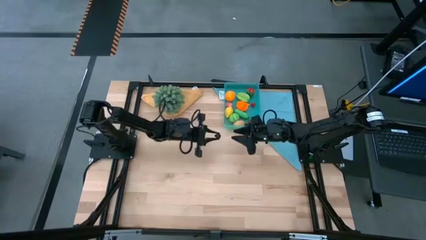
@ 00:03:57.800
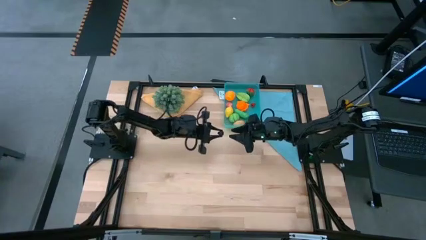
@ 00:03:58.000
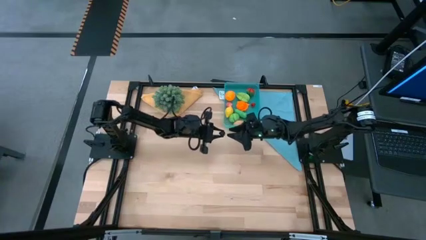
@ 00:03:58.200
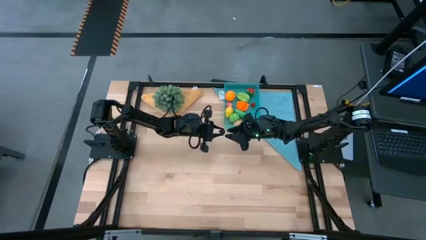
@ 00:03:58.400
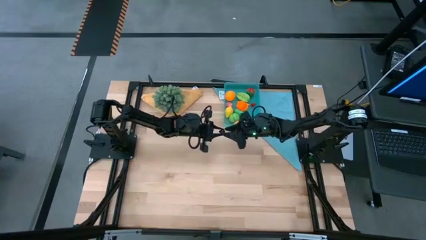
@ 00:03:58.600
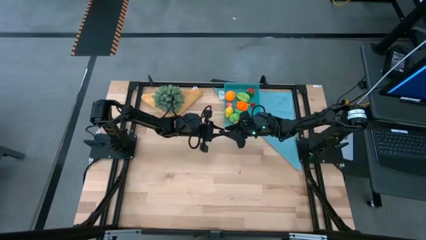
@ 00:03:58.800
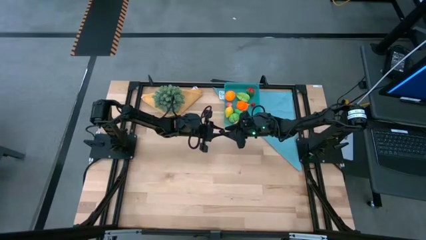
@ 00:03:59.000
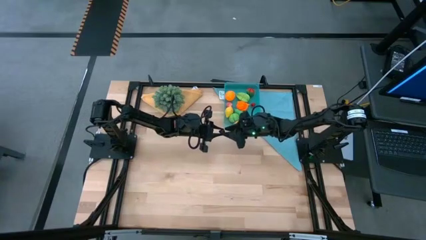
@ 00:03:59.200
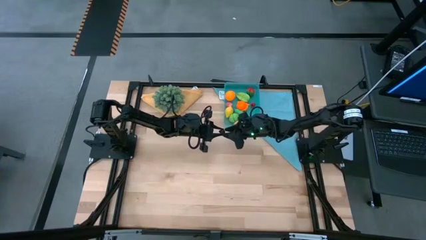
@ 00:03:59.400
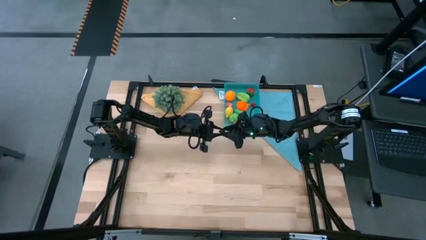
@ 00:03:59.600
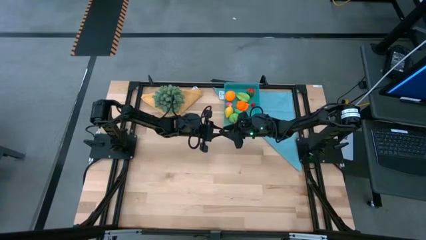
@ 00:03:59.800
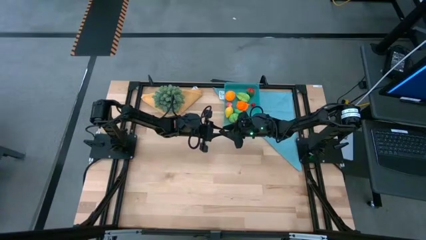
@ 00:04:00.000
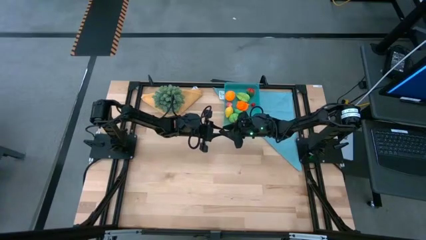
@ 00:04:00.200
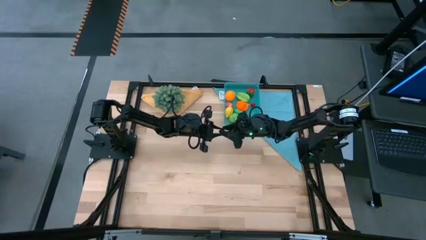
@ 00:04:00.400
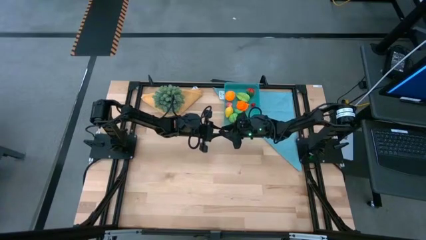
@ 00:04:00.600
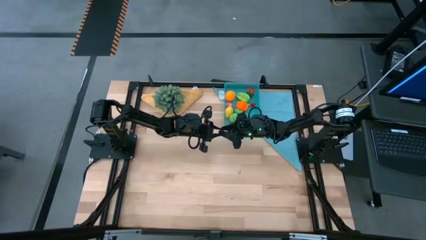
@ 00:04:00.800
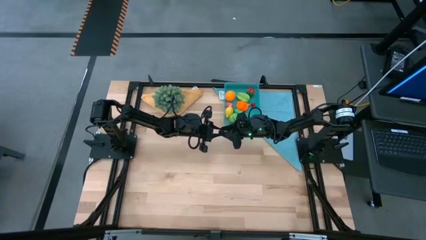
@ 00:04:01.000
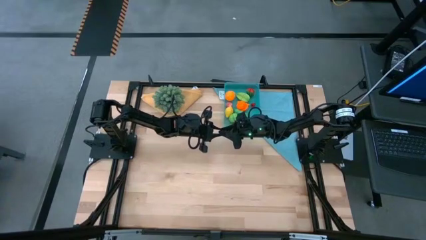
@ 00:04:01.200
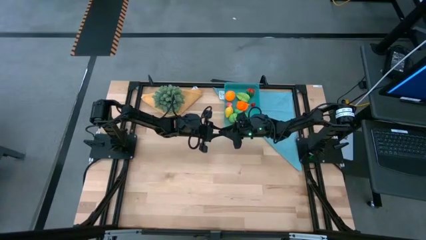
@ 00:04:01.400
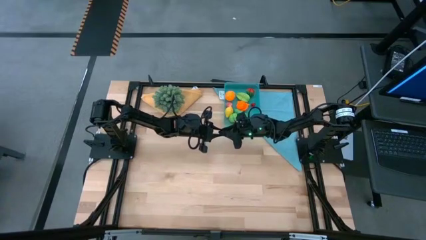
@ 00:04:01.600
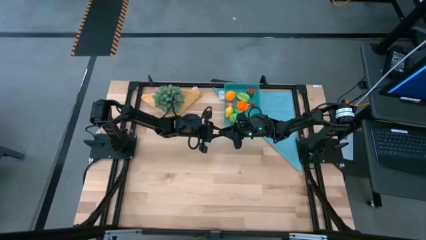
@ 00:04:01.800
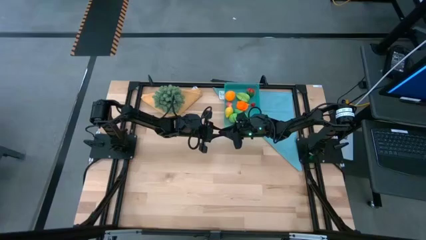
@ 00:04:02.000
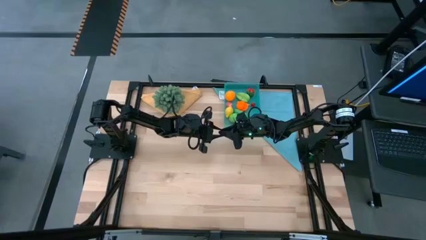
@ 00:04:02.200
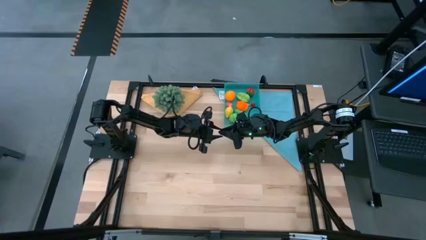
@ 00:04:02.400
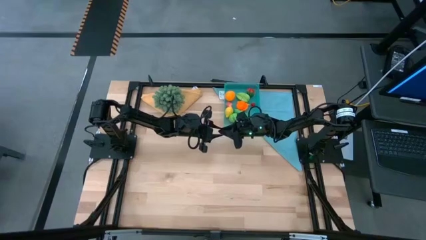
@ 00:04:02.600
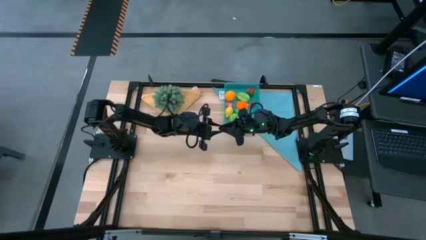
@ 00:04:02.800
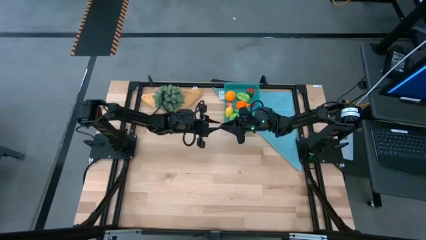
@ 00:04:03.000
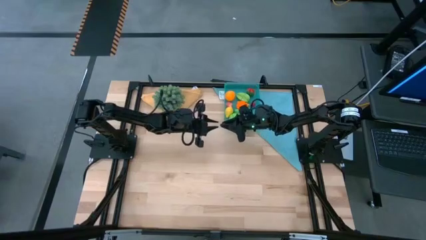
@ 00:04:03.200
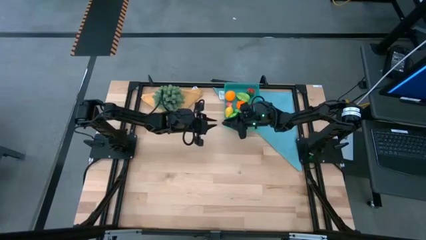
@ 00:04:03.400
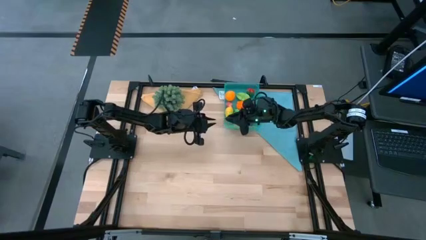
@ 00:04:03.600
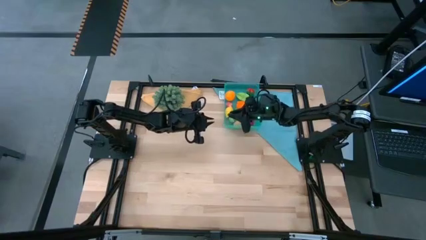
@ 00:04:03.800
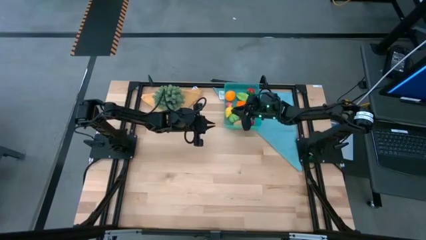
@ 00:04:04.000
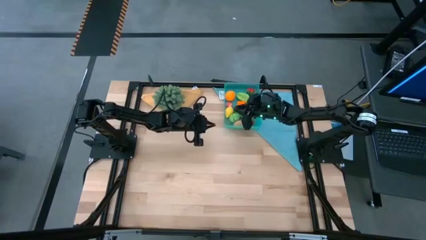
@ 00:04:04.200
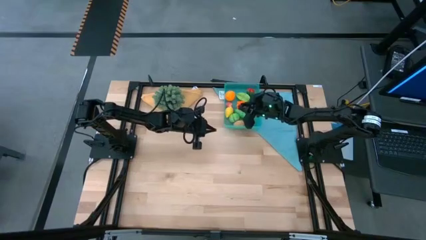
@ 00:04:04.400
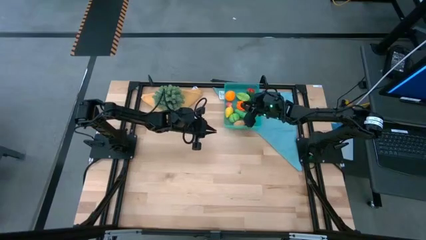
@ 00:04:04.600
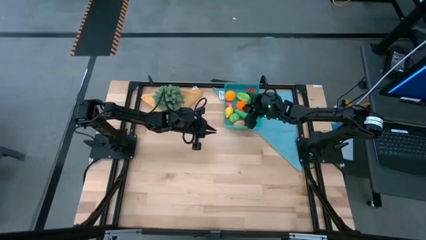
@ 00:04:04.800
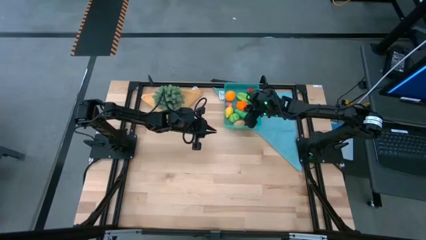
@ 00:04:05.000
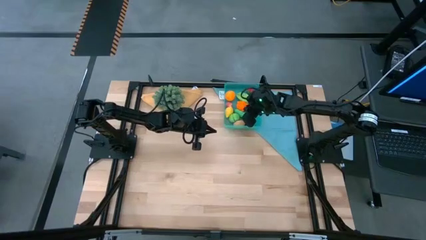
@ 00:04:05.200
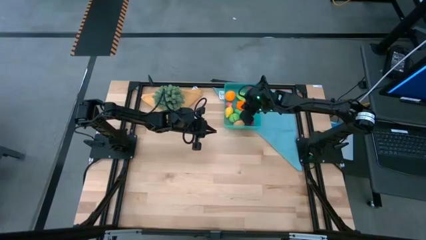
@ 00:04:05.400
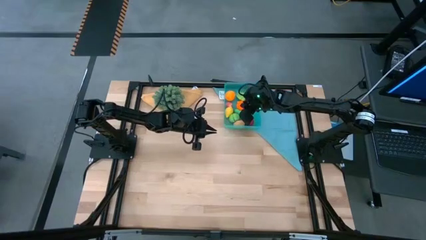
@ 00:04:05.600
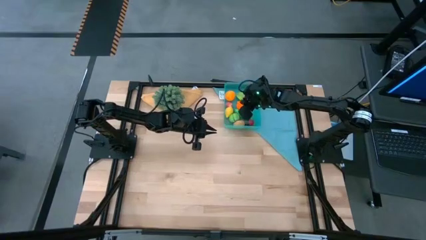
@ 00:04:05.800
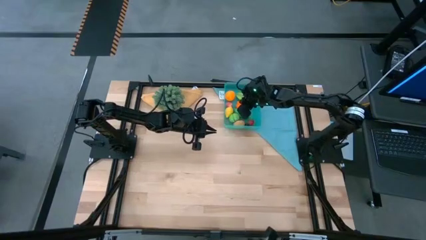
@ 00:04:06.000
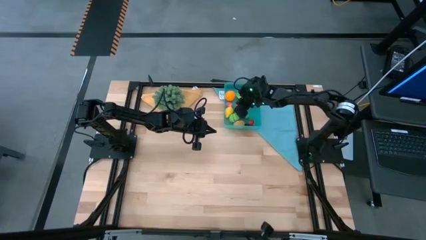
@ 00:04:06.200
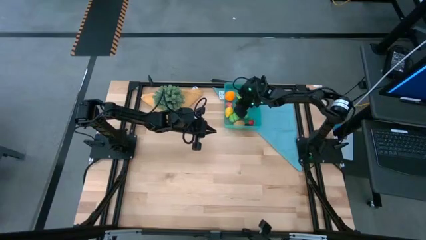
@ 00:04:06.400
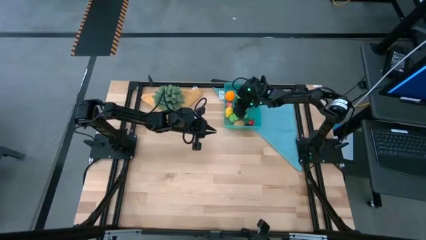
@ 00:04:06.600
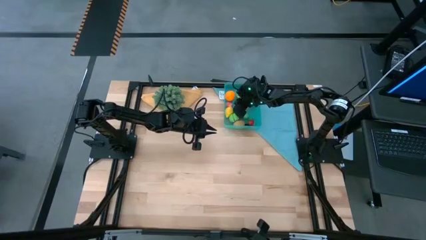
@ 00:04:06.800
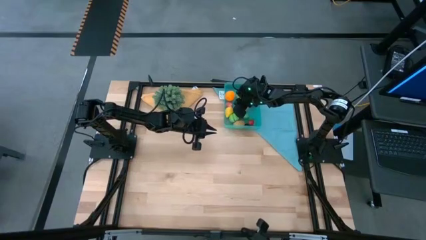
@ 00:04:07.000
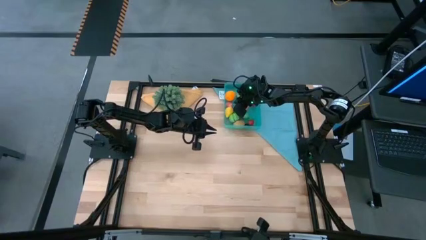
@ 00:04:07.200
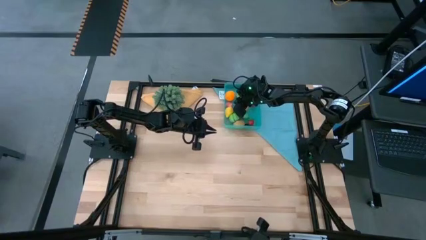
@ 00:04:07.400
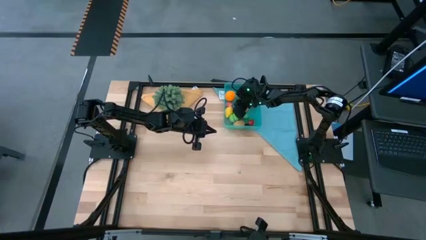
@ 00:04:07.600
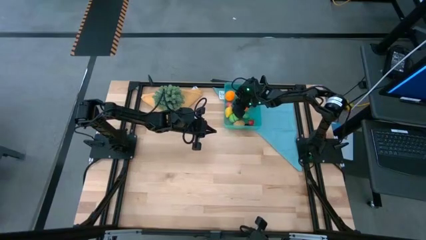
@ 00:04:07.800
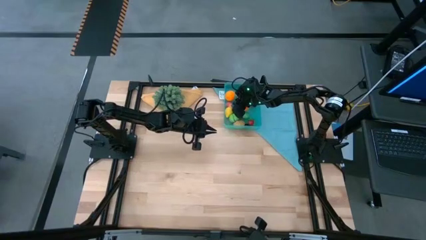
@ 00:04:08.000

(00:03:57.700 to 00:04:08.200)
Task: Pick and placing Produce into tupperware
Put the blackberry into the blue bin

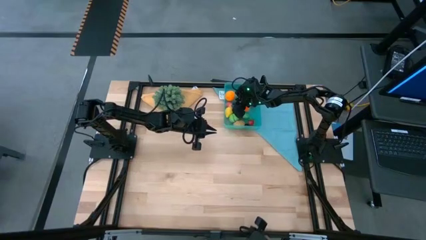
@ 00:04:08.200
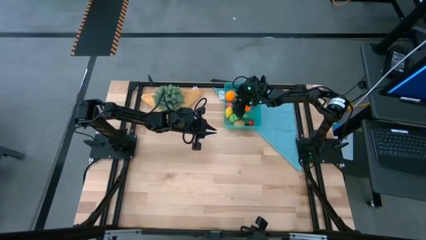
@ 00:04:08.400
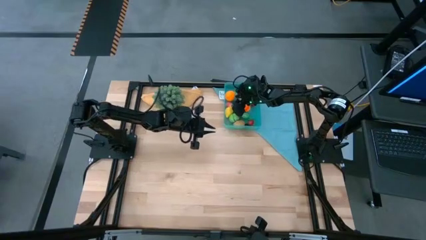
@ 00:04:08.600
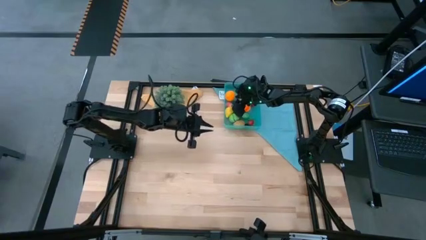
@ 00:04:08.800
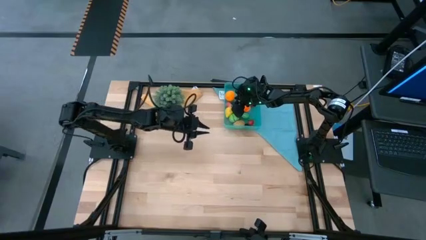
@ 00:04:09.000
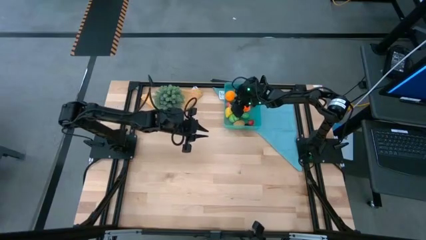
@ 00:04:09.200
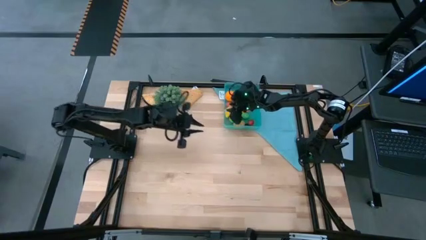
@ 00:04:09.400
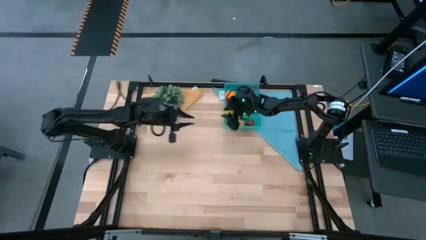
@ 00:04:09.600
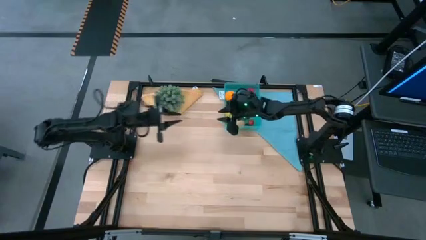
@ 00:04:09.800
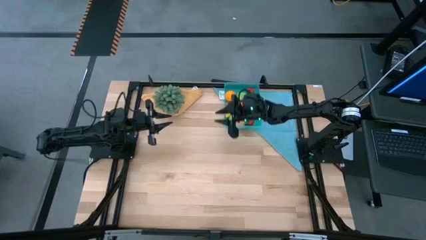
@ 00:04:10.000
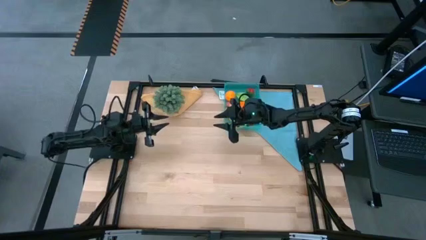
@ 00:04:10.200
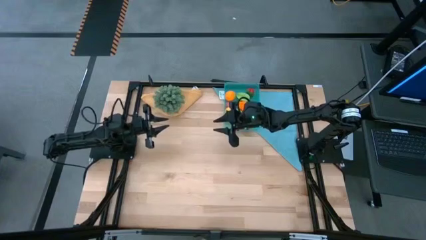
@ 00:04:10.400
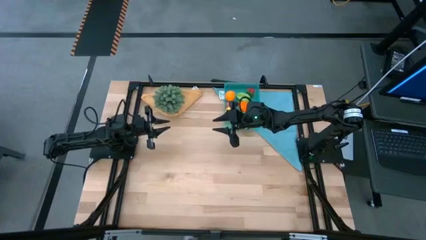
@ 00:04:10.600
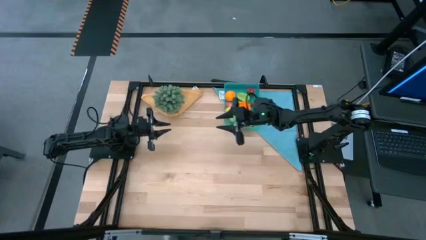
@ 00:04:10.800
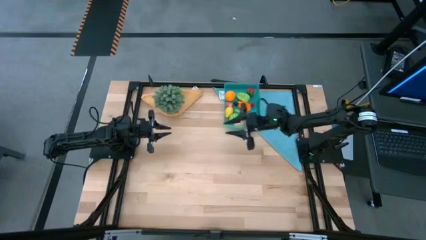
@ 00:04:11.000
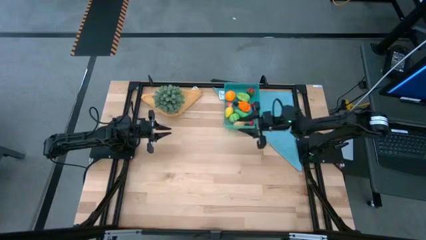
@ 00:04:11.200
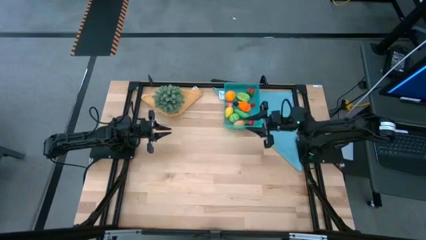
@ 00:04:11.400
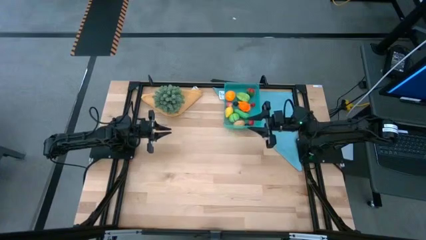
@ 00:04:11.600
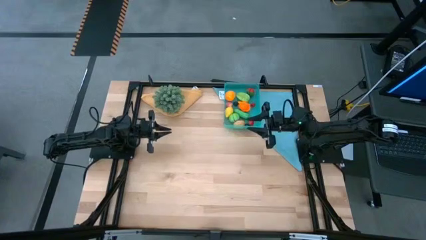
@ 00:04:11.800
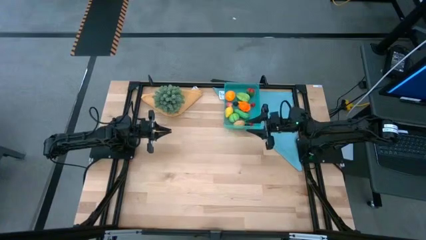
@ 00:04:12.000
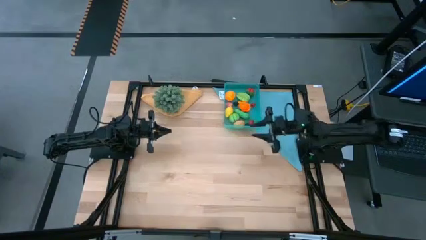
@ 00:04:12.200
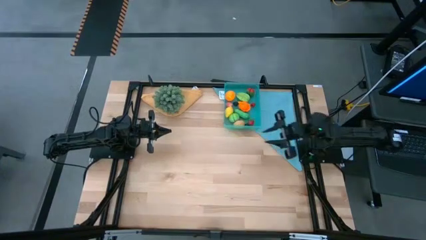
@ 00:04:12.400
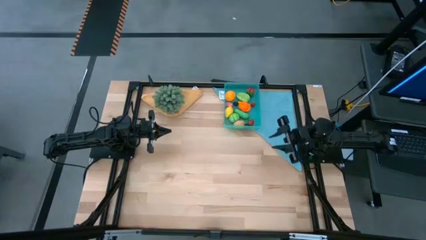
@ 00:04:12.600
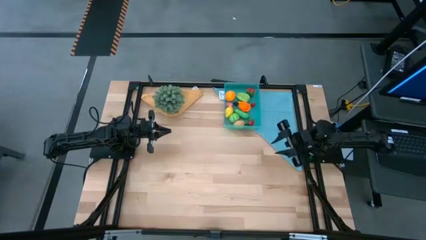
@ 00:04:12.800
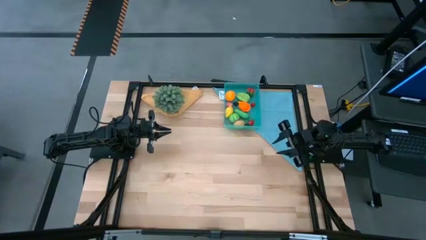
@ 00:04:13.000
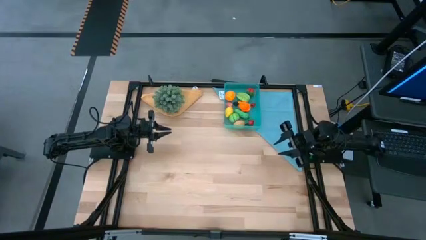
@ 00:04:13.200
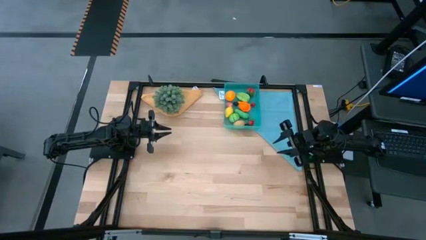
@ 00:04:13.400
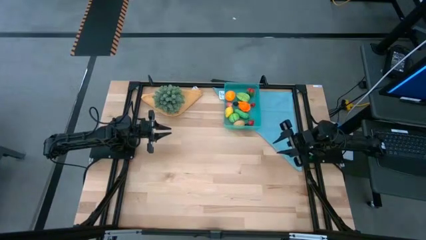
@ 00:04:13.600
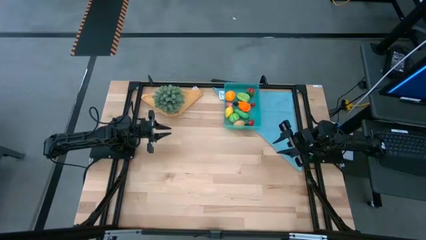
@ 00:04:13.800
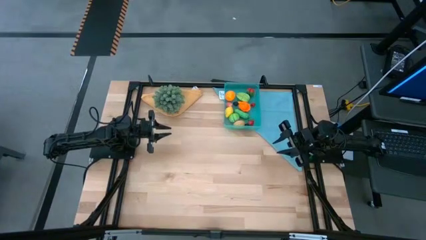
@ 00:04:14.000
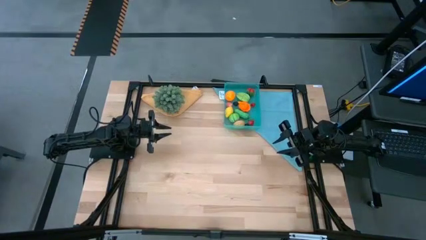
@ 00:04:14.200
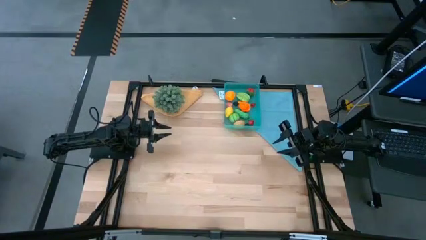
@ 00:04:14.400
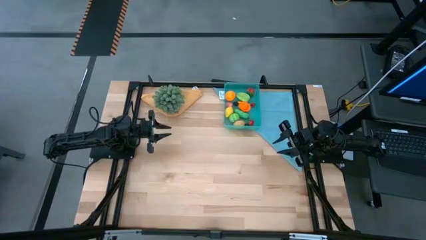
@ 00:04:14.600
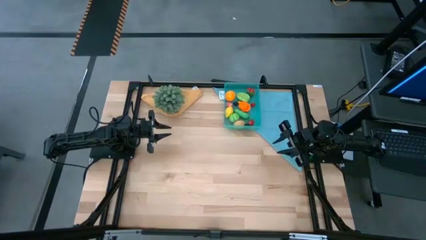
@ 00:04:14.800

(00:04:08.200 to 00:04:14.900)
Return to Home Position
